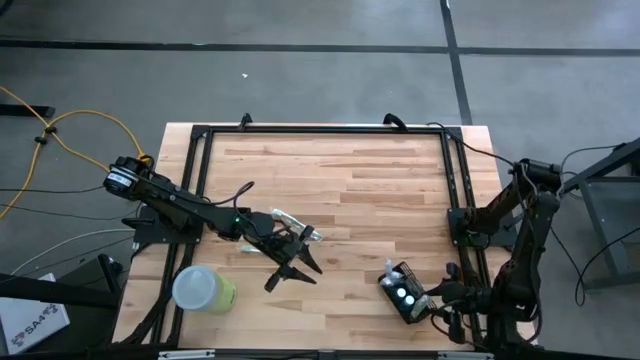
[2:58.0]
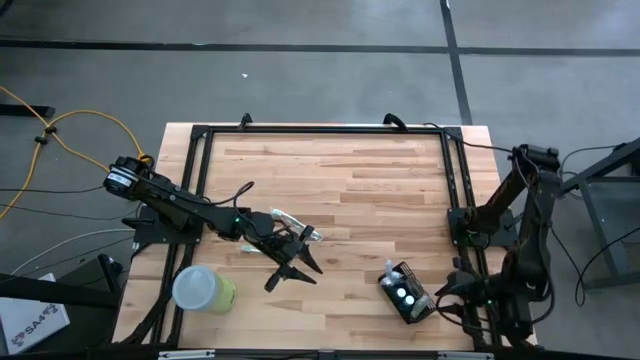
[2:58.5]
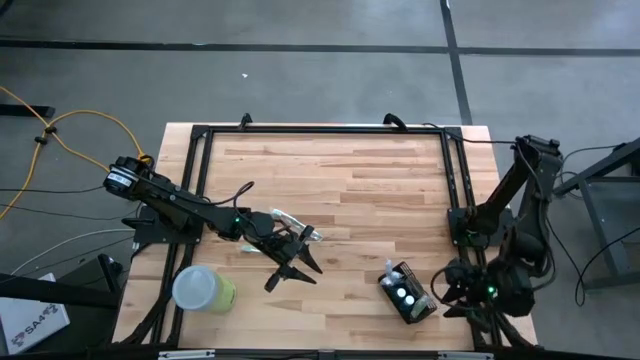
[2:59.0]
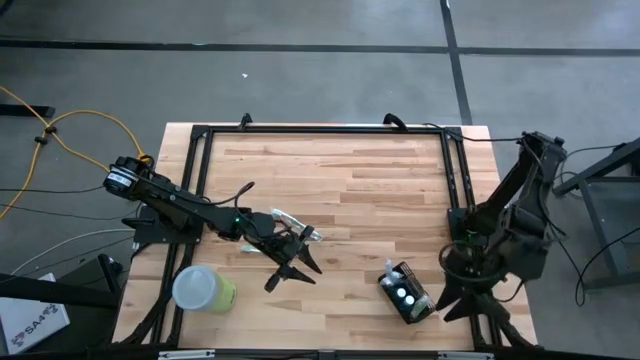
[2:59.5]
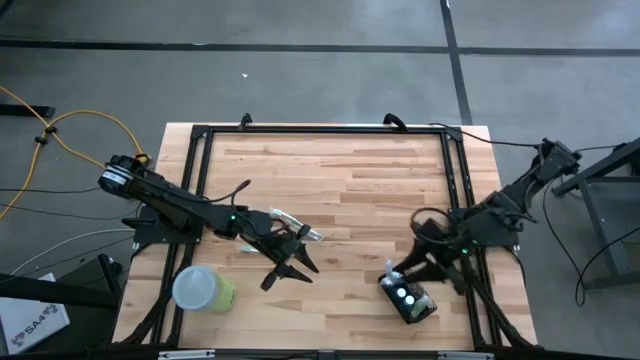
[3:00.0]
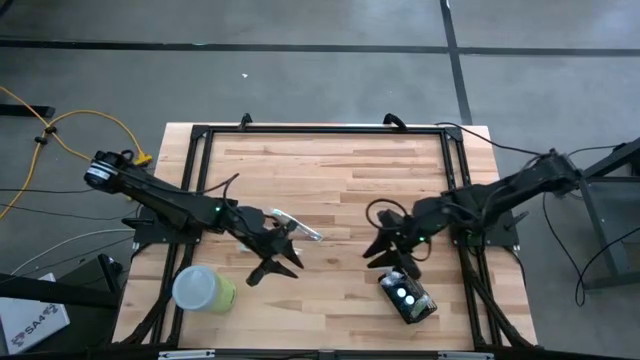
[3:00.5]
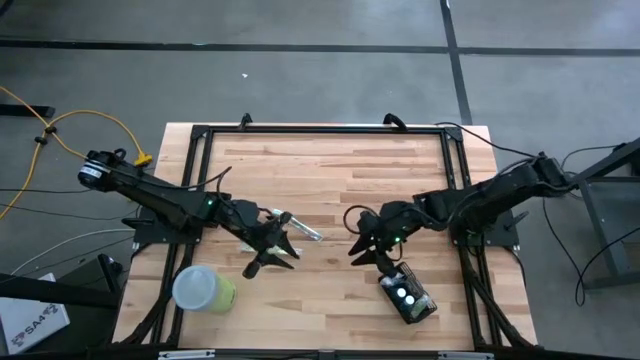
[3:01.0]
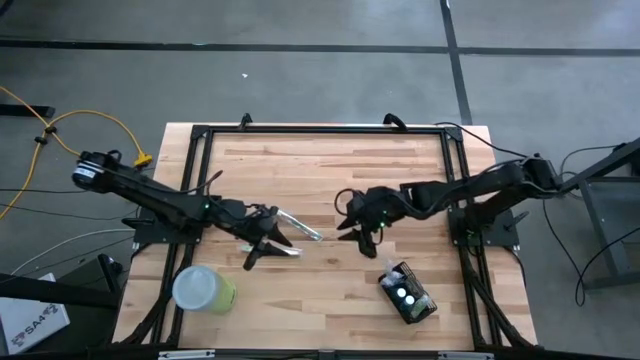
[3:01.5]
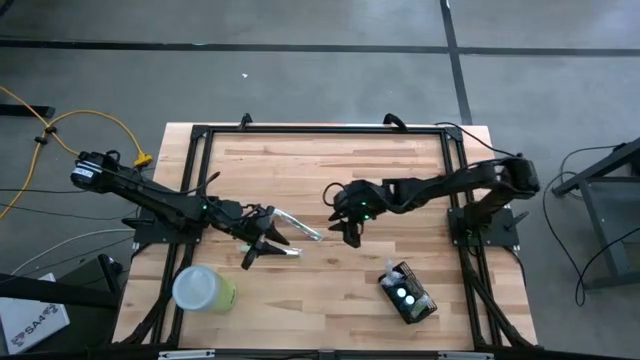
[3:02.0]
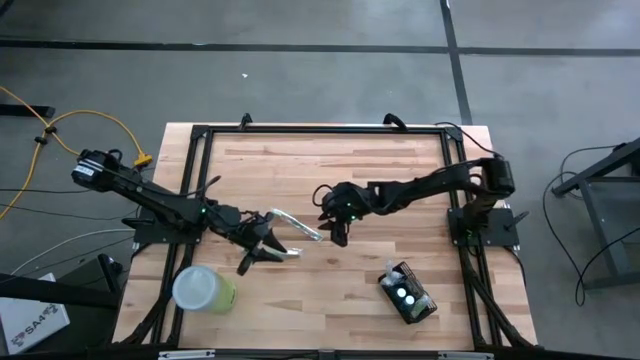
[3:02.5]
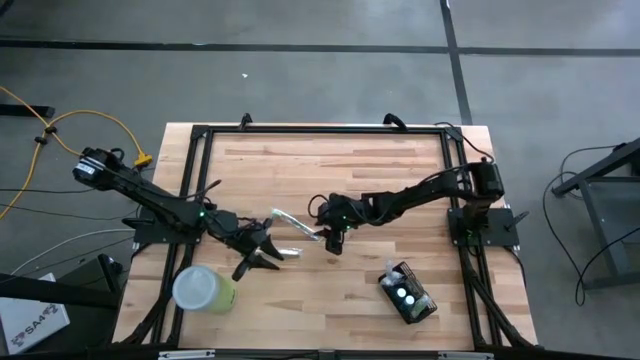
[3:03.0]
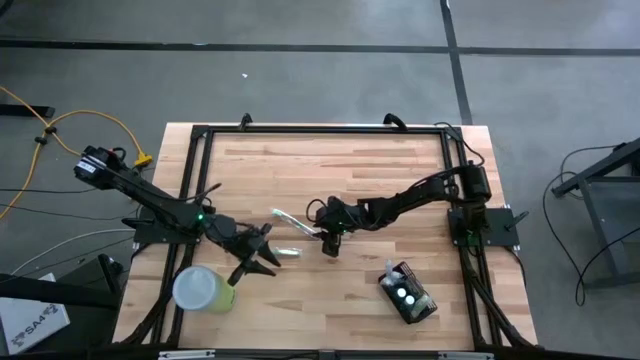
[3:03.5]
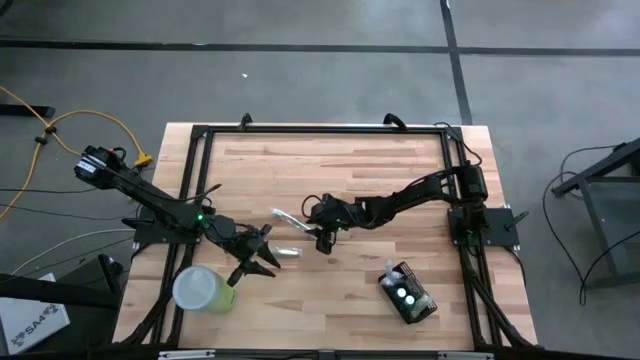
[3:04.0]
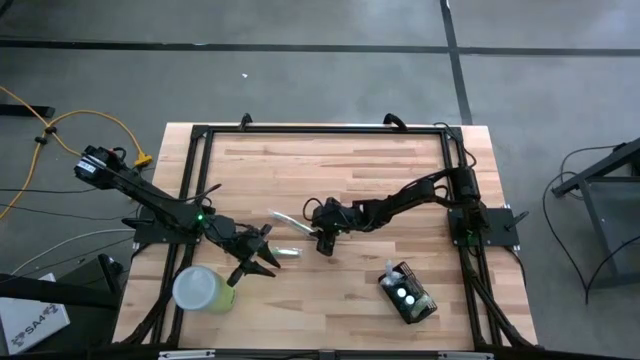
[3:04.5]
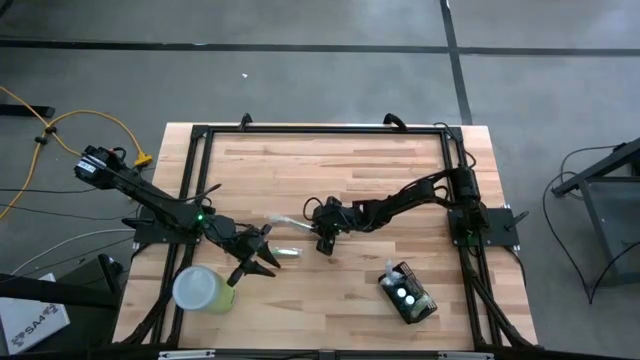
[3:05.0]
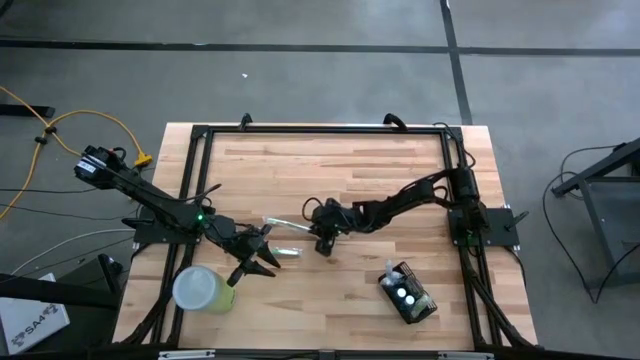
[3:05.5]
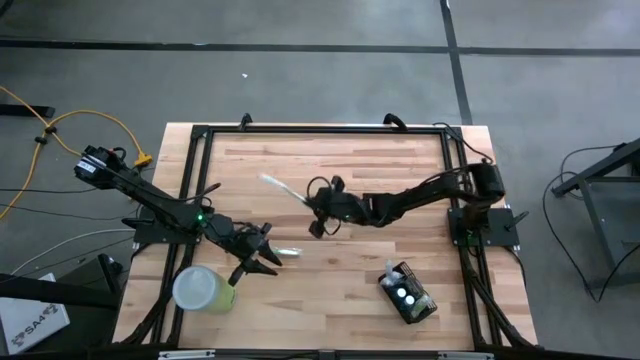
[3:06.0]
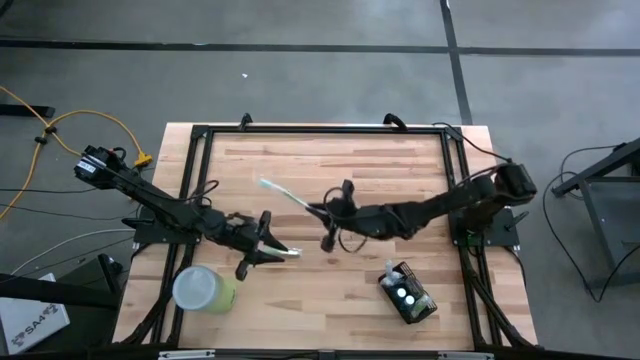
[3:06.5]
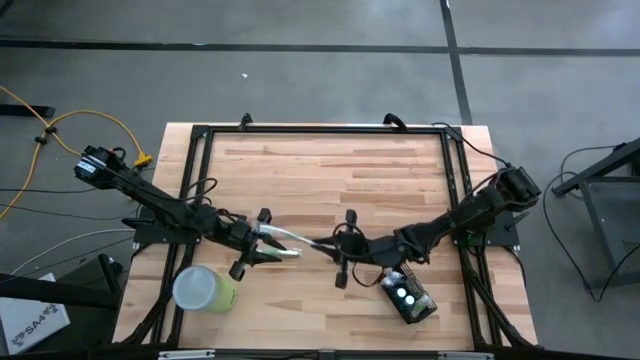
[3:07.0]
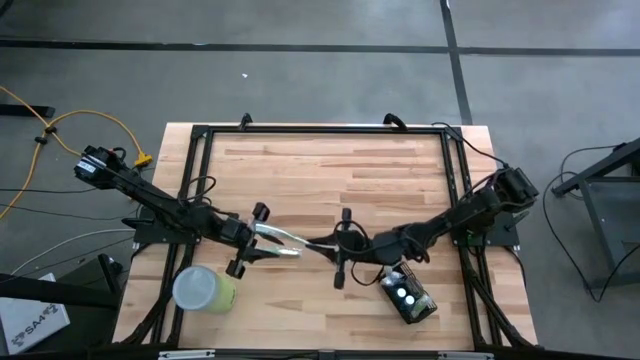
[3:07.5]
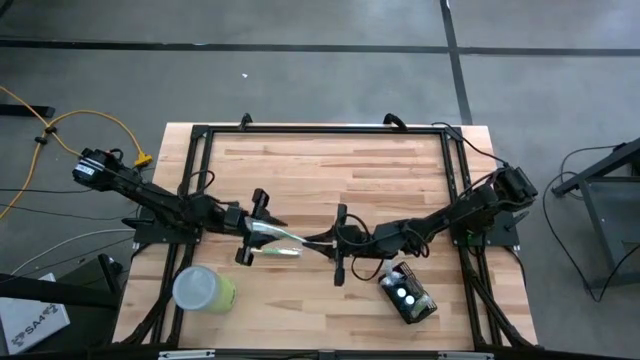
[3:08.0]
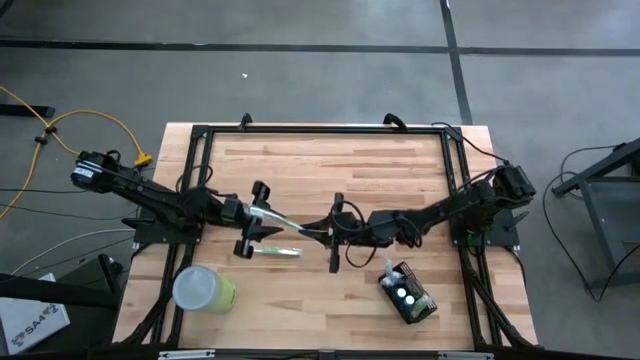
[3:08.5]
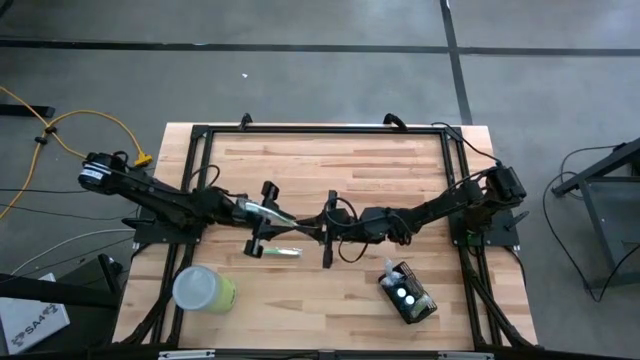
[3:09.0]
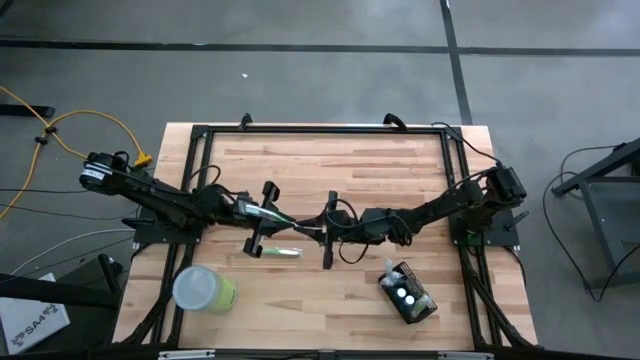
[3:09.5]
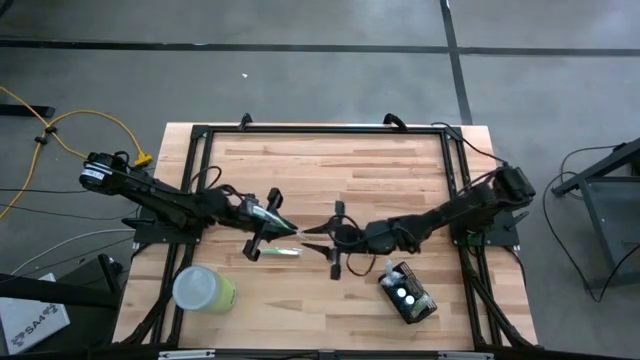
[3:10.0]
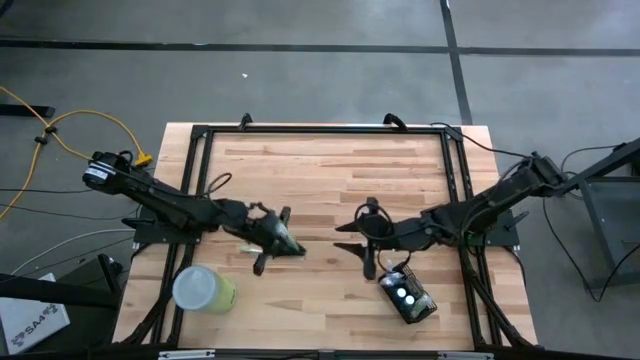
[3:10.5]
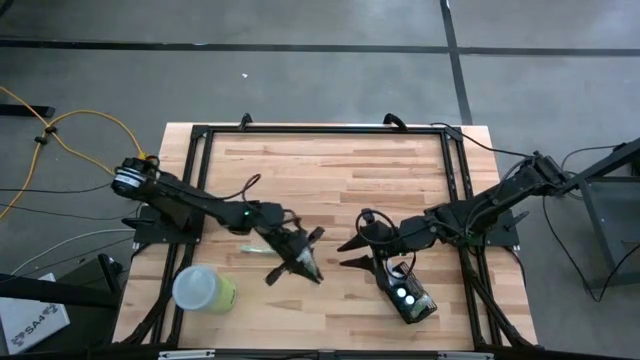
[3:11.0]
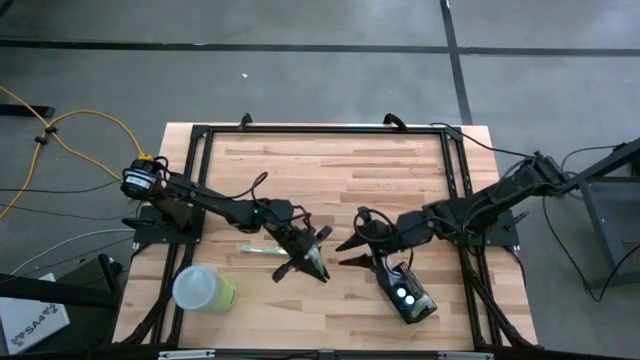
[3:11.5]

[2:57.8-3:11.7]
Task: Pick & Place toothbrushing station
Put the top green toothbrush into the bottom section of the black wire organizer

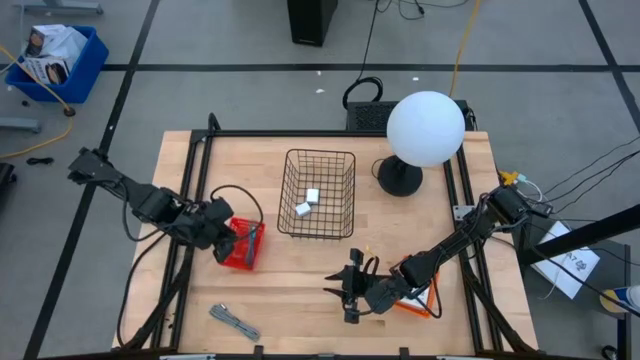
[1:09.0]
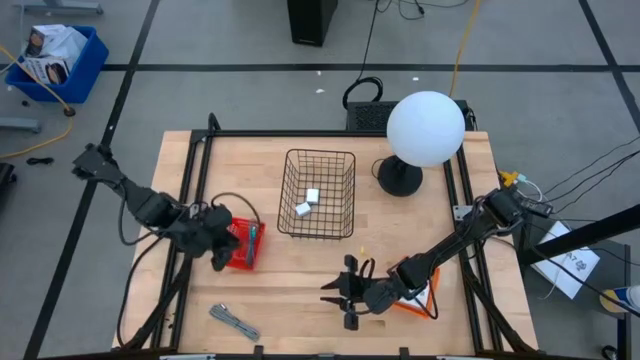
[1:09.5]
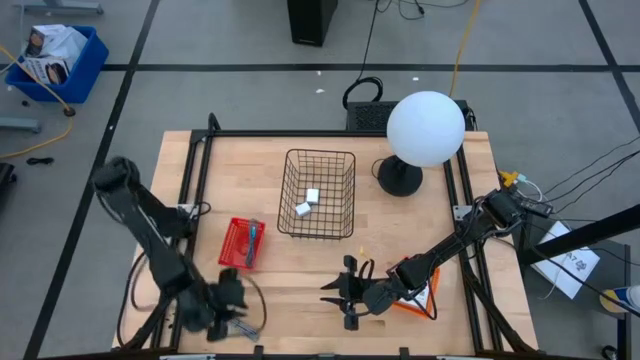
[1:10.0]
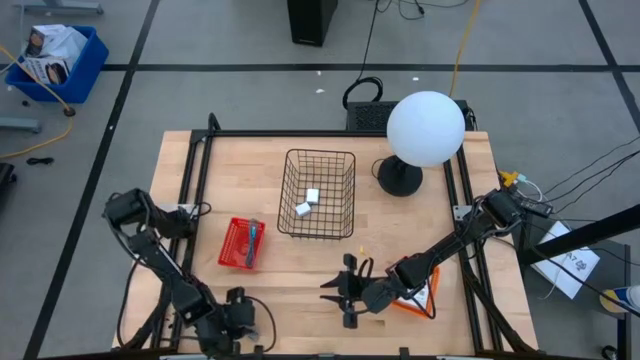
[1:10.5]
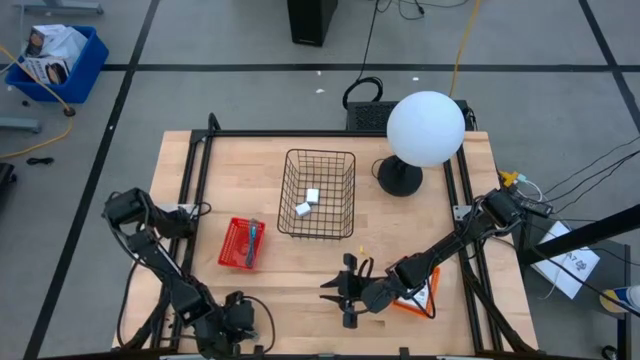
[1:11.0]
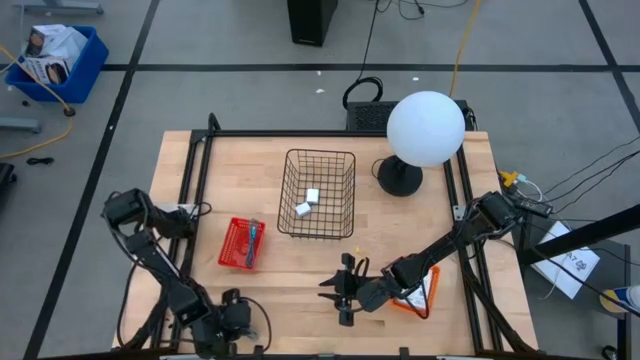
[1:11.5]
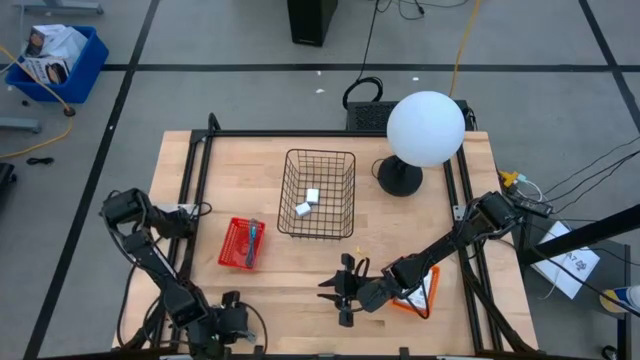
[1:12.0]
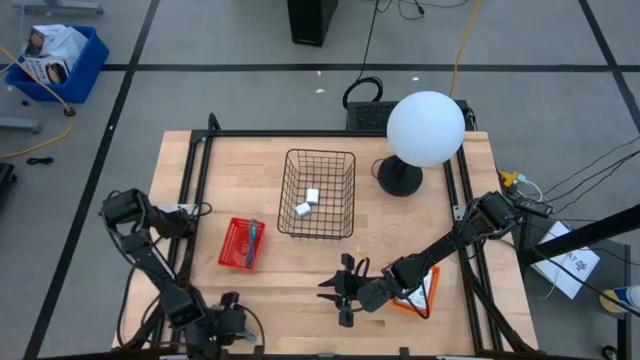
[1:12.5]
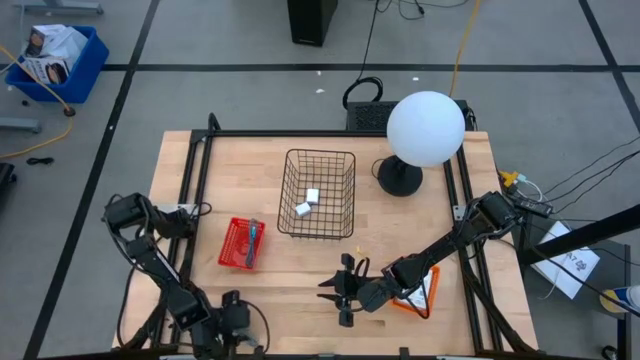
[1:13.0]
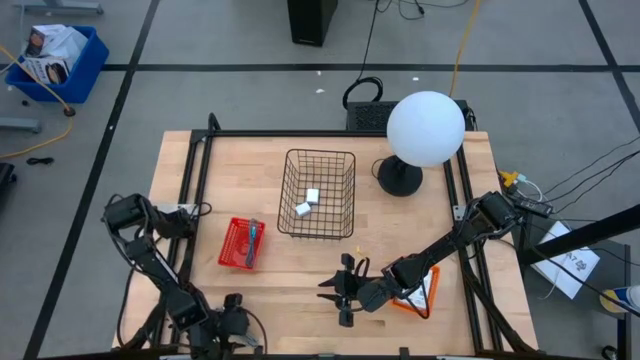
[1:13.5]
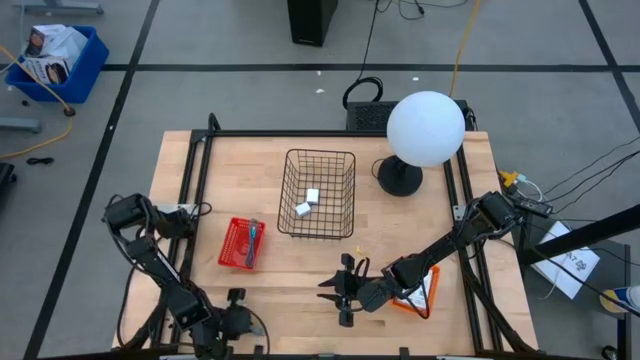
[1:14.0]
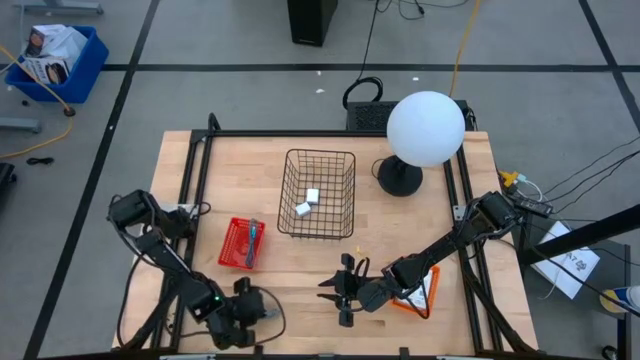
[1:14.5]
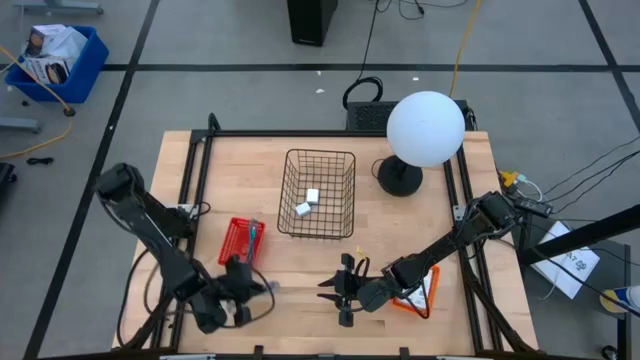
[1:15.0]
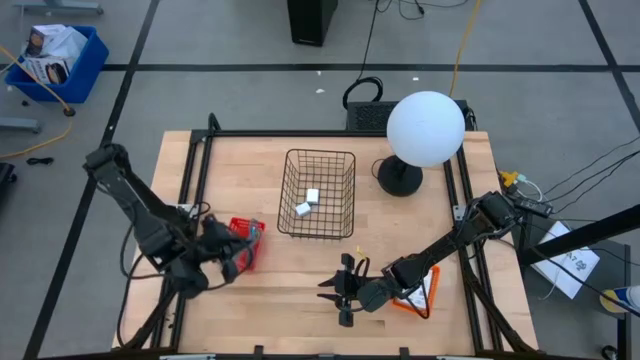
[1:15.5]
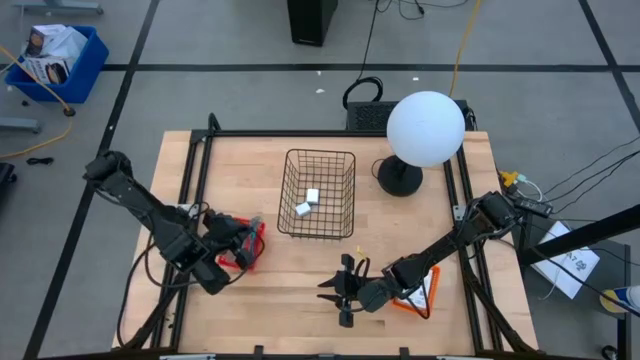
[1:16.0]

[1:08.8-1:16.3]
Task: Pick and place items into bin
Put the black charger cable into the red basket
